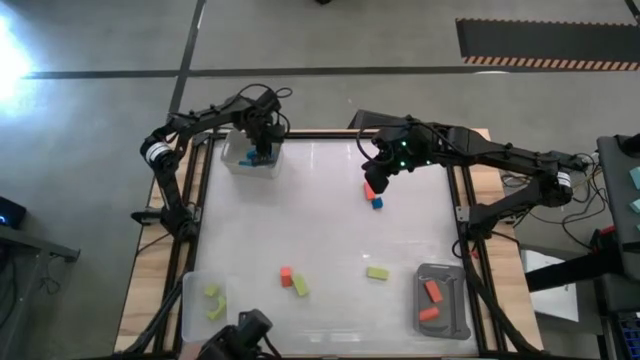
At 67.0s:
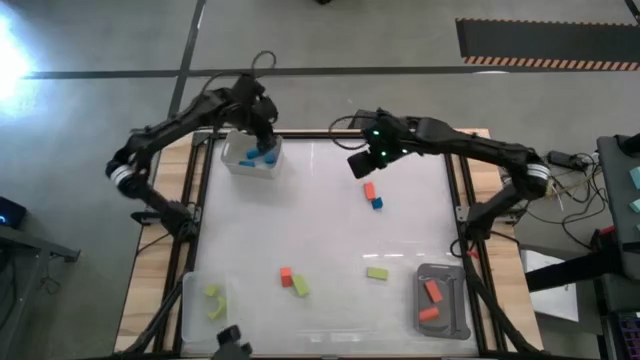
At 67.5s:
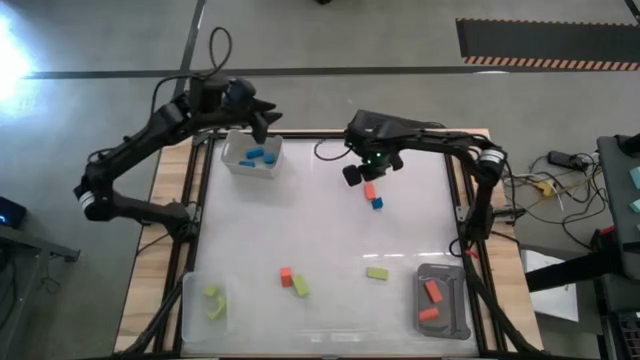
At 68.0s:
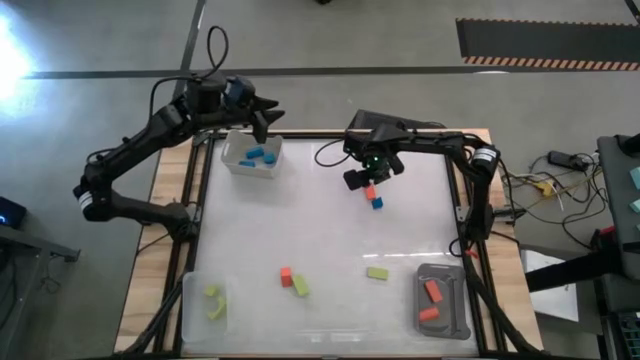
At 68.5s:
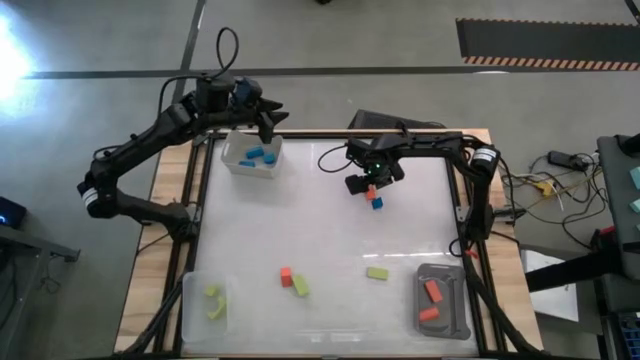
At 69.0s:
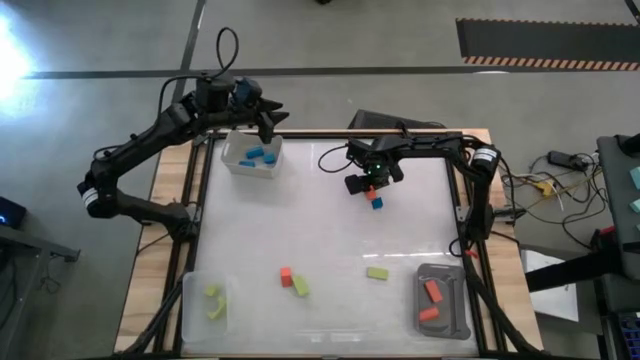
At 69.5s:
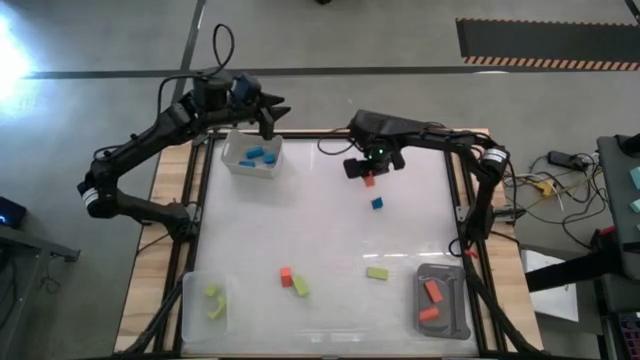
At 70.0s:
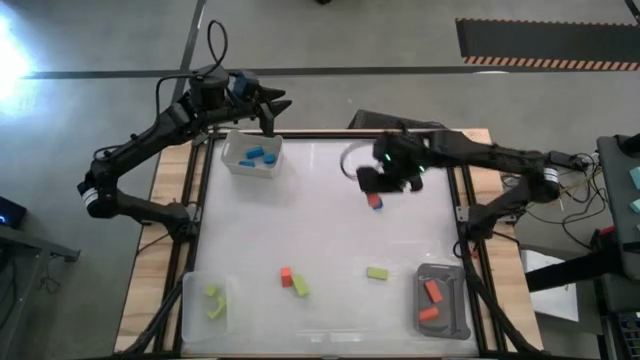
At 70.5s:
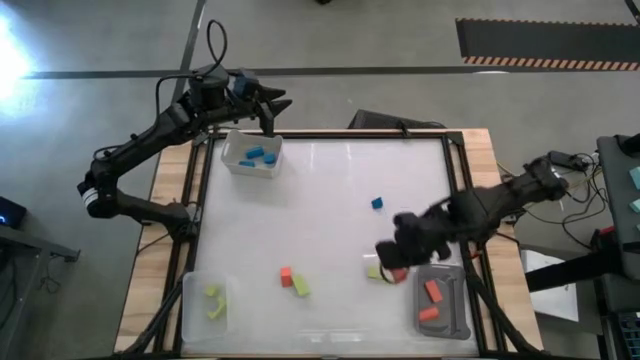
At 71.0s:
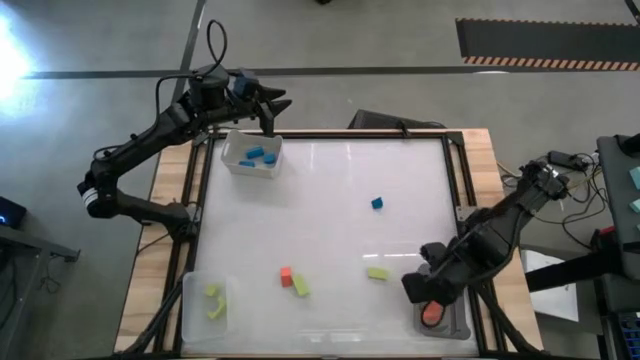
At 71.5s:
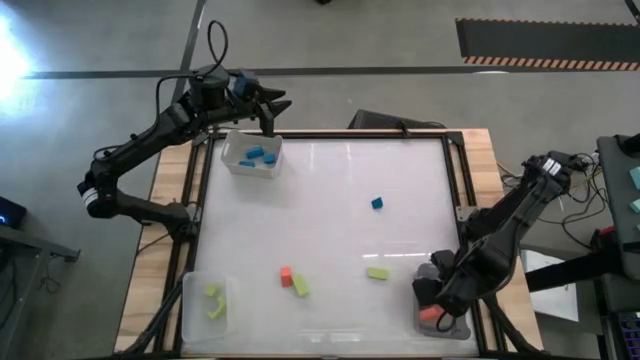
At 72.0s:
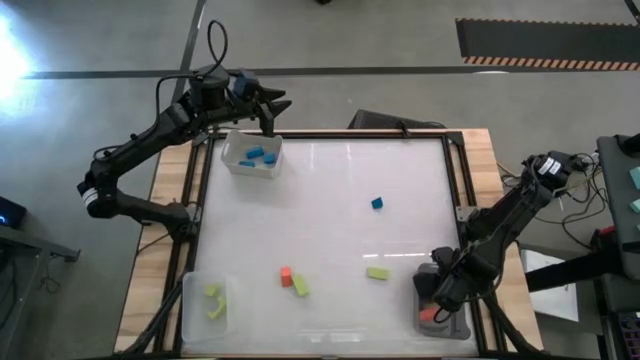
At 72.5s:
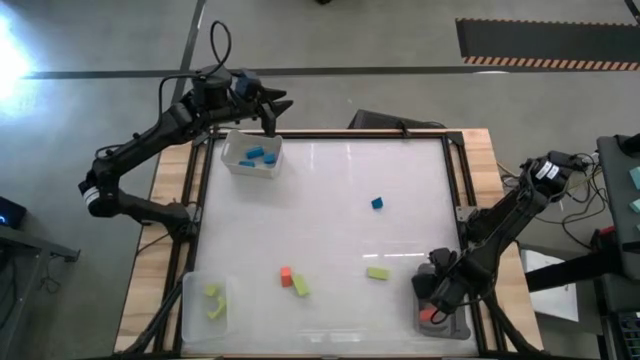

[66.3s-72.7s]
Task: Sort & place blocks by color
Put the orange block into the black bin

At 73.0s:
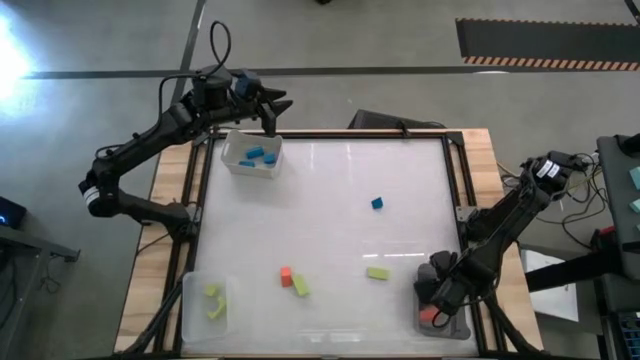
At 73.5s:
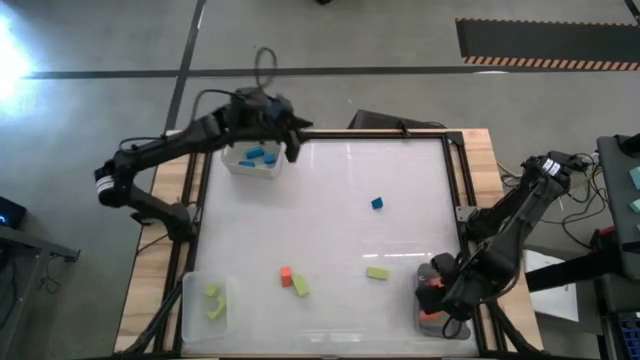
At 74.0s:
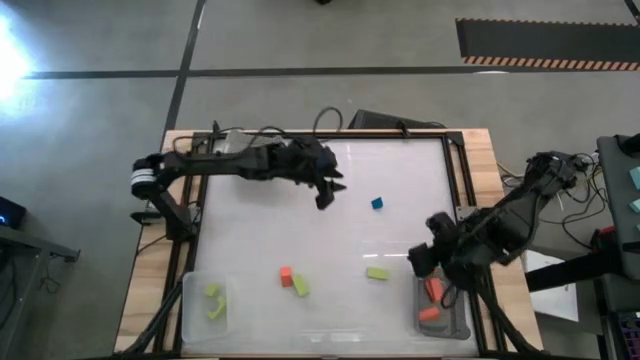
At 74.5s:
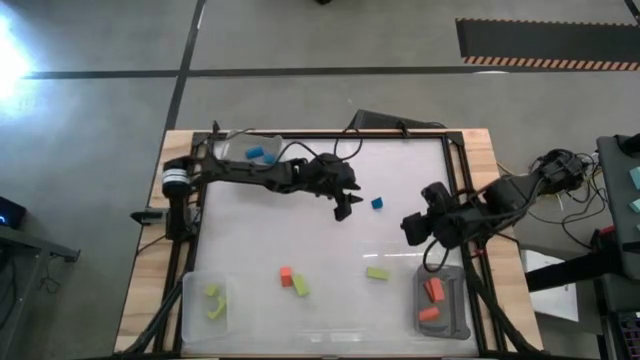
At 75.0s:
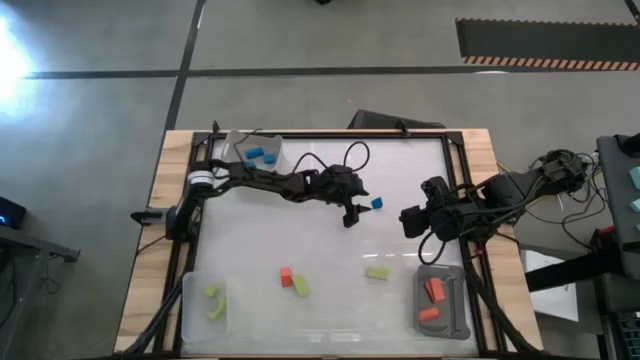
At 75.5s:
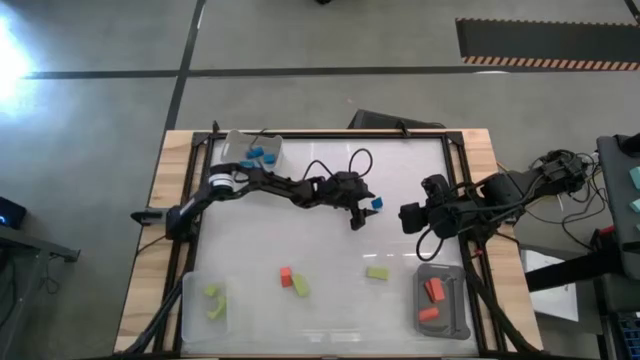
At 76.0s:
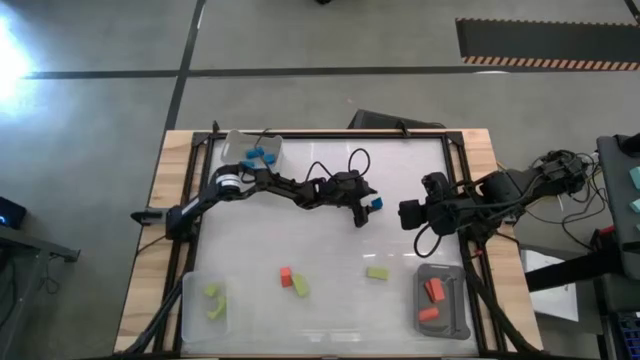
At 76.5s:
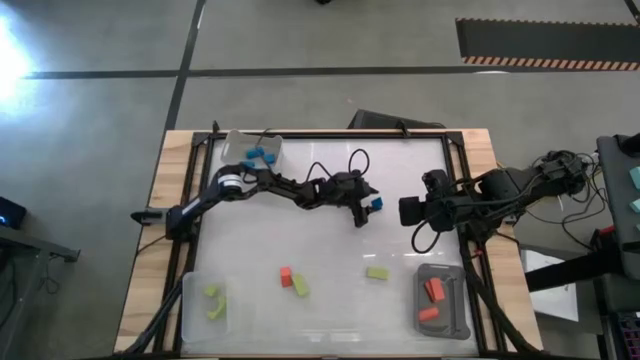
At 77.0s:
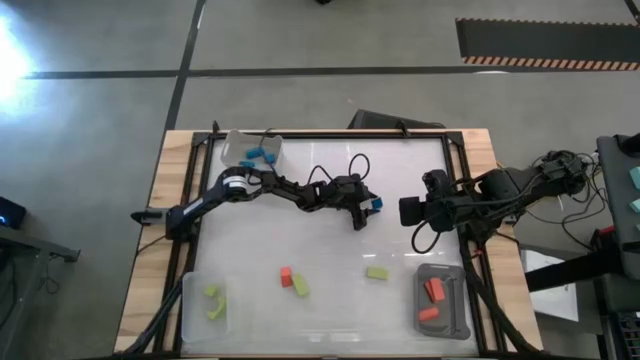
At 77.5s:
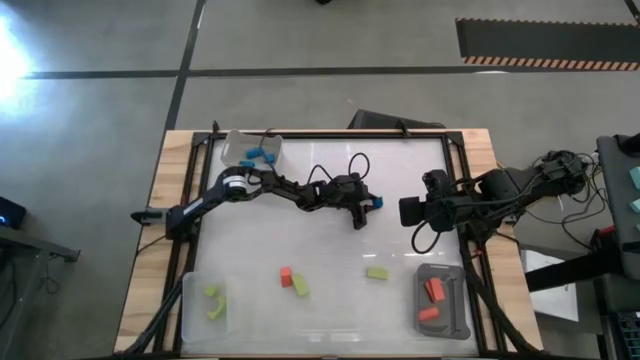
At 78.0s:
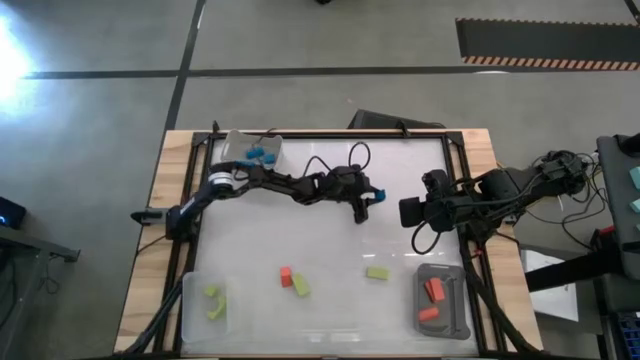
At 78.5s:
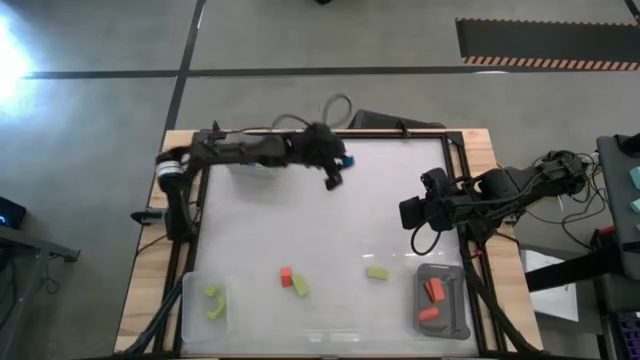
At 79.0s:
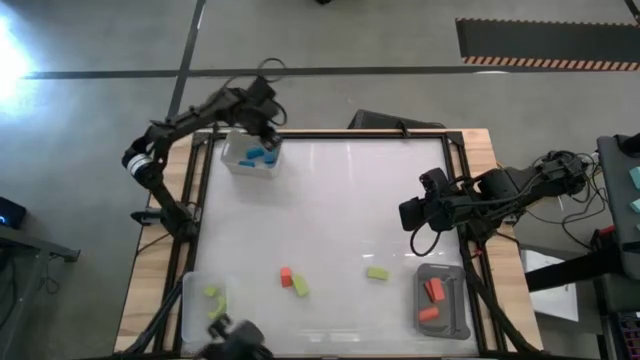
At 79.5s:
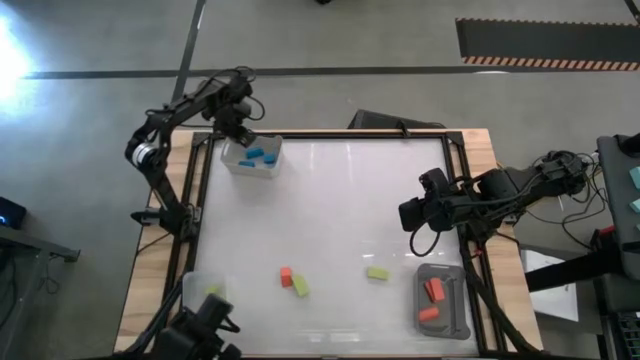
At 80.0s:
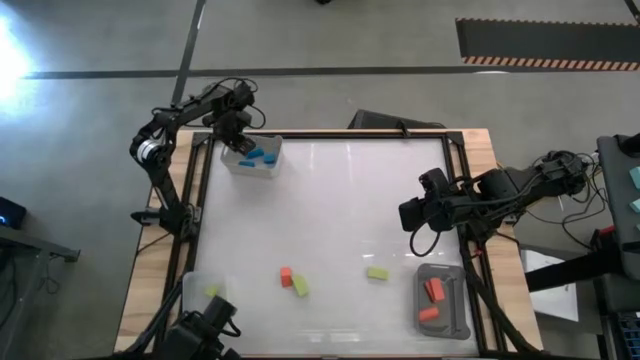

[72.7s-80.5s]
Put the blue block into the white bin

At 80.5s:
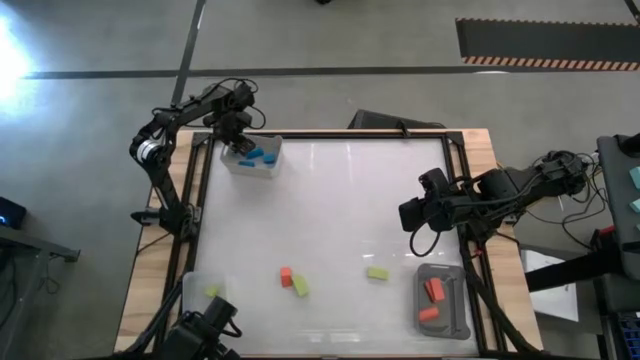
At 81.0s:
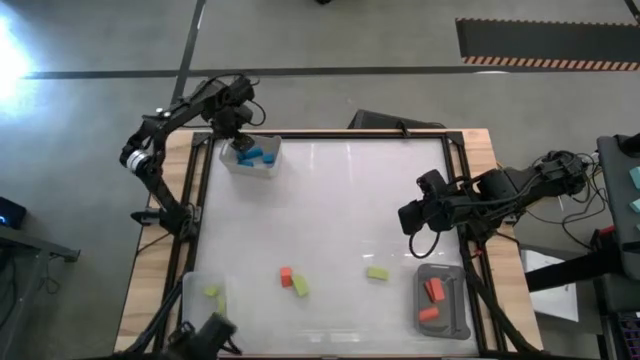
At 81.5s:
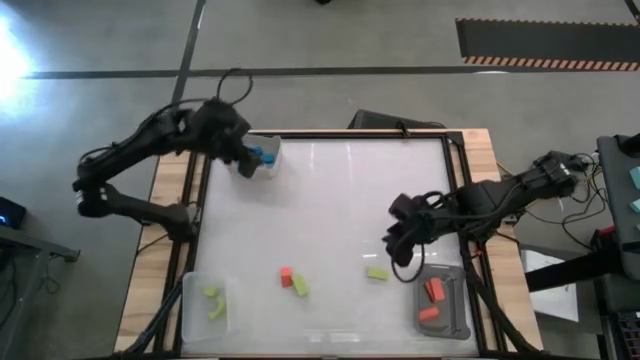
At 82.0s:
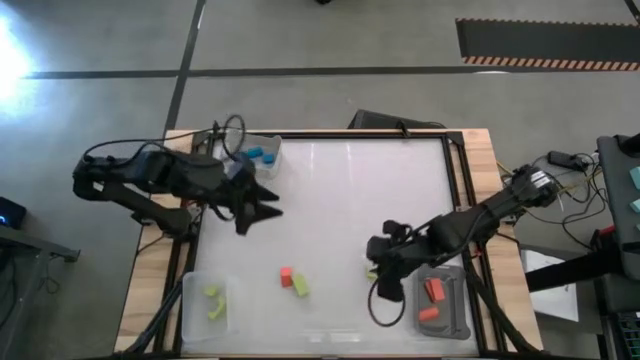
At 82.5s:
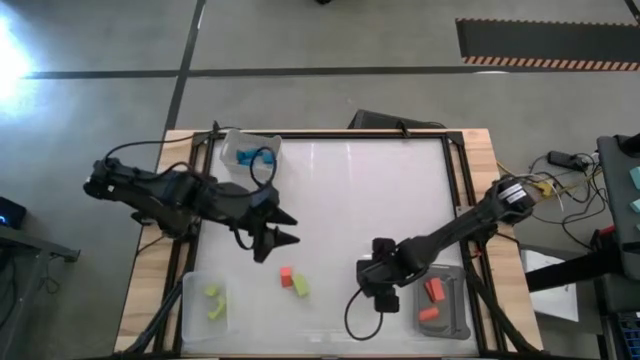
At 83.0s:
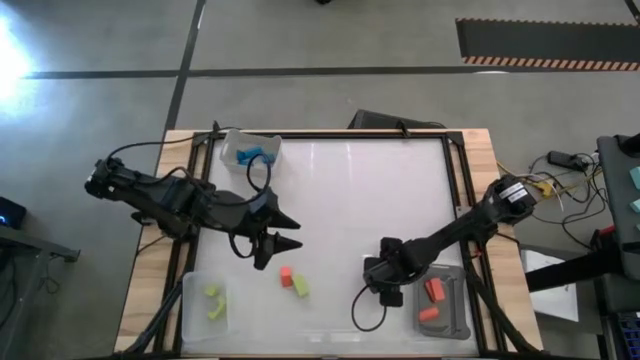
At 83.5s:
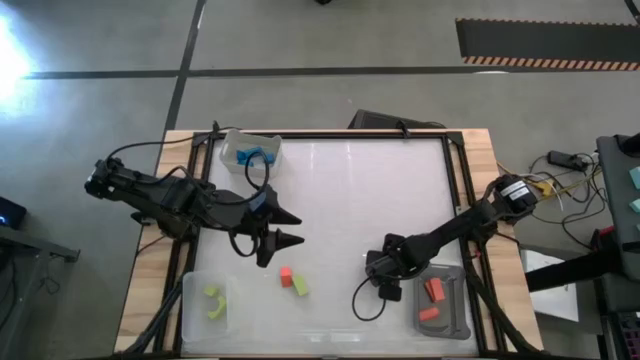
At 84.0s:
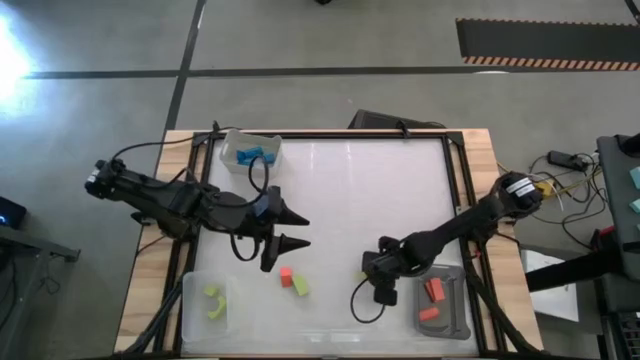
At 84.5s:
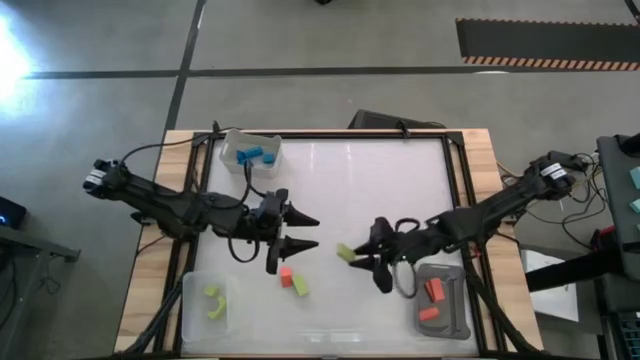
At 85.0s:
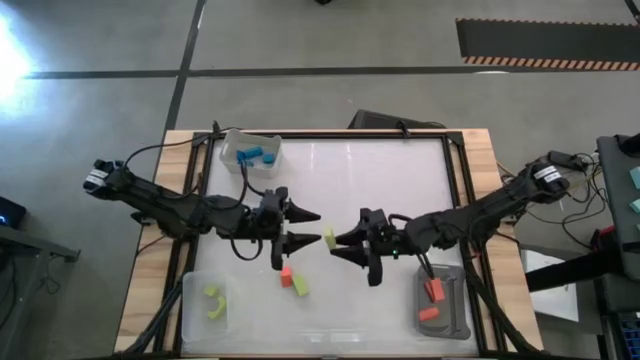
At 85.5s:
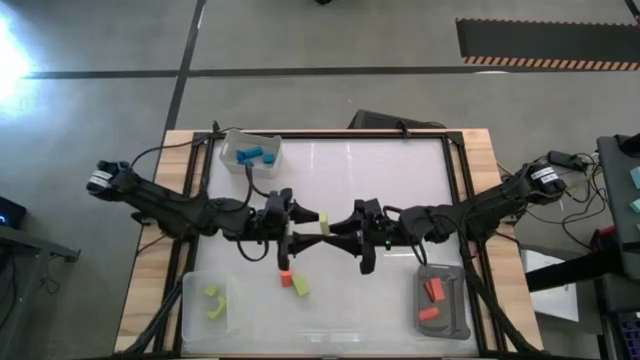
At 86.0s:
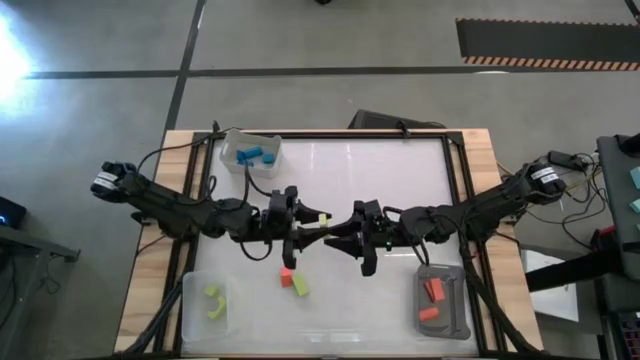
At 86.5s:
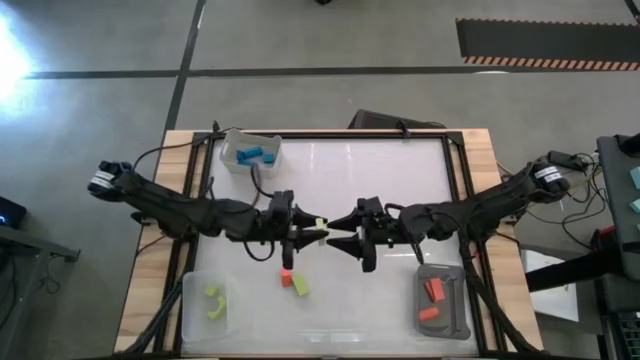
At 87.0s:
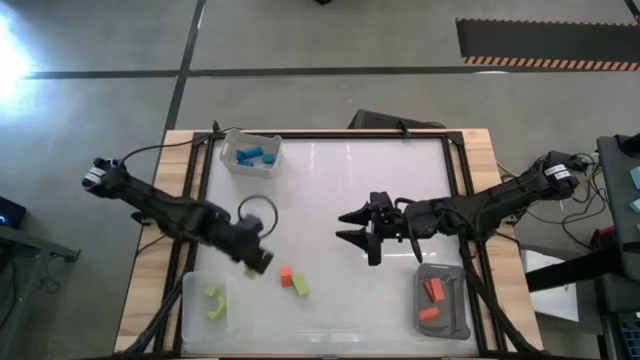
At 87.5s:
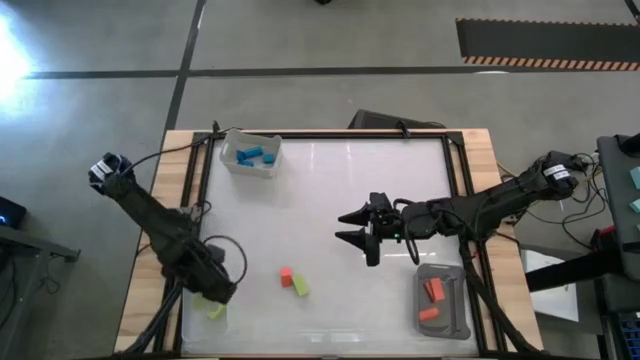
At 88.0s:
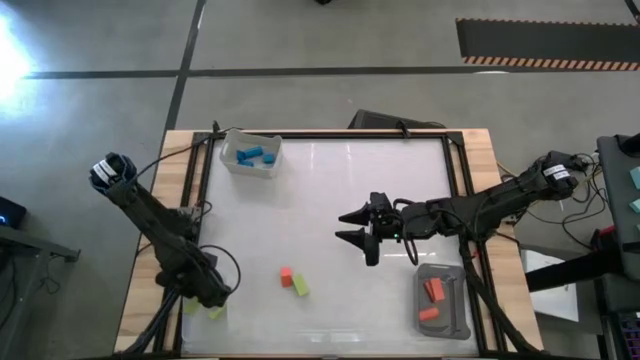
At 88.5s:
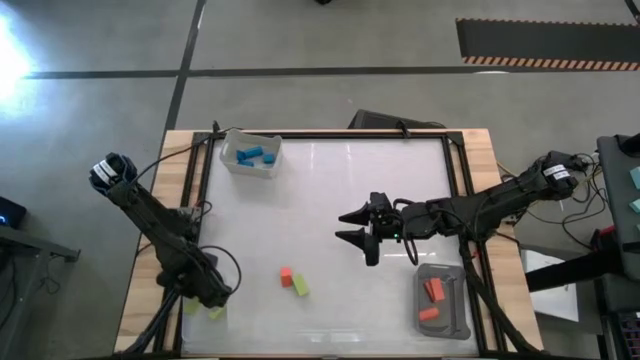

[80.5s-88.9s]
Put the green block into the transparent bin
